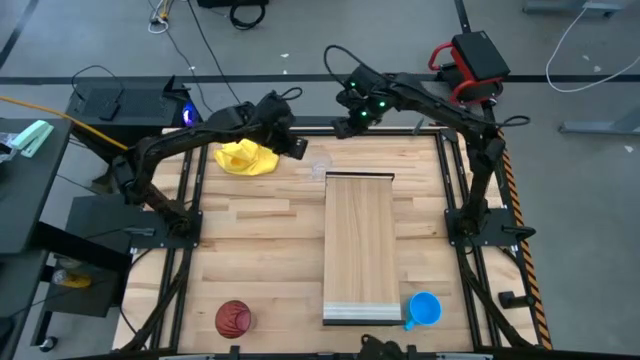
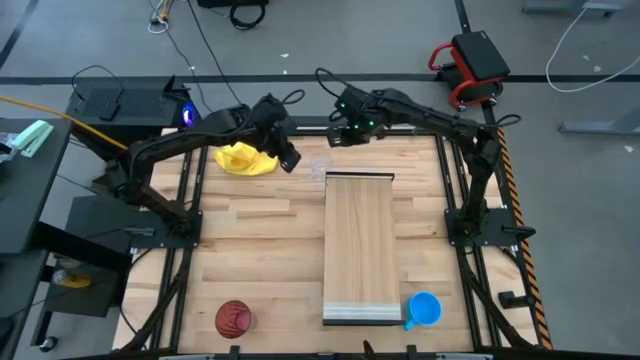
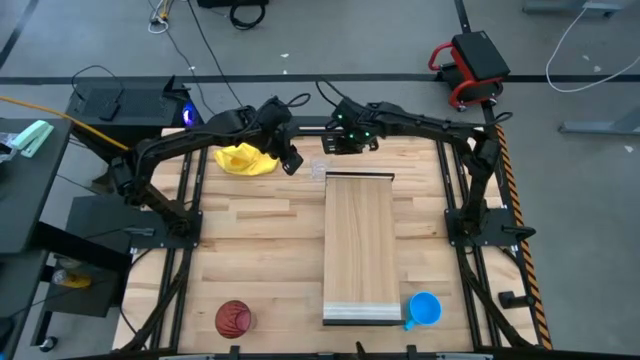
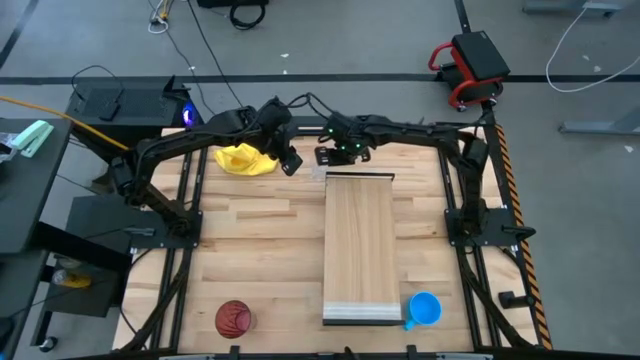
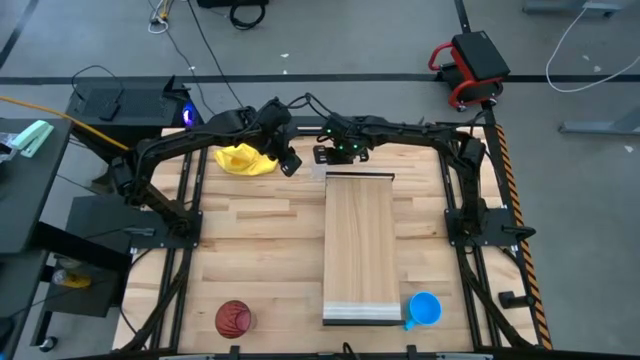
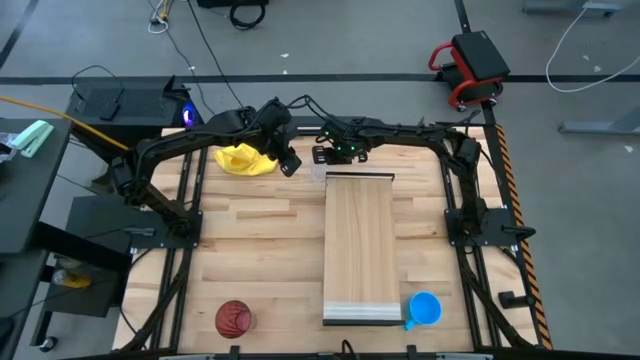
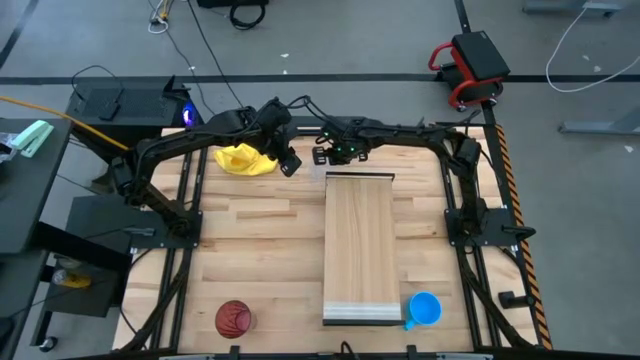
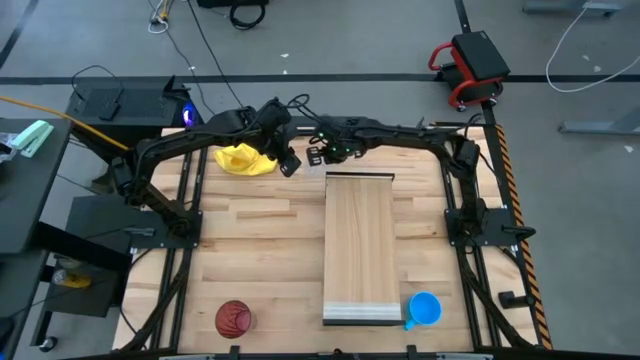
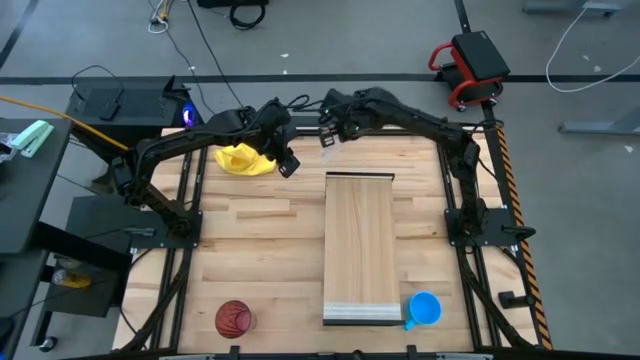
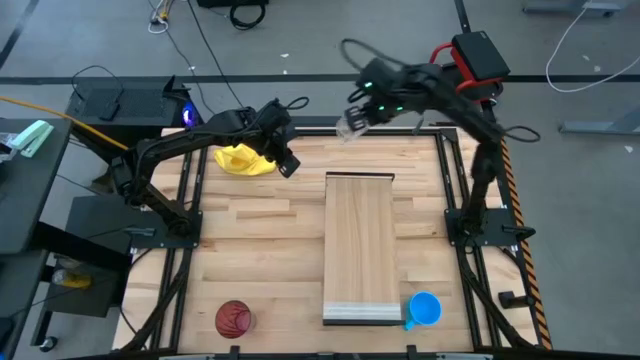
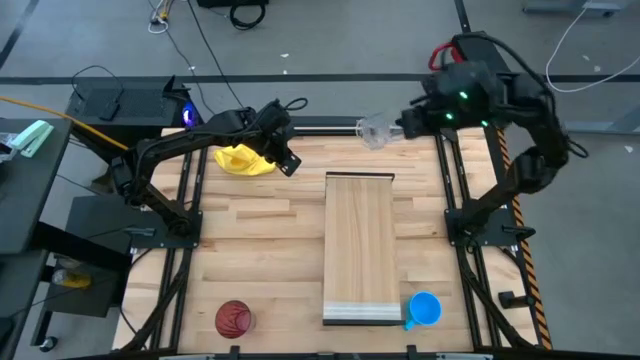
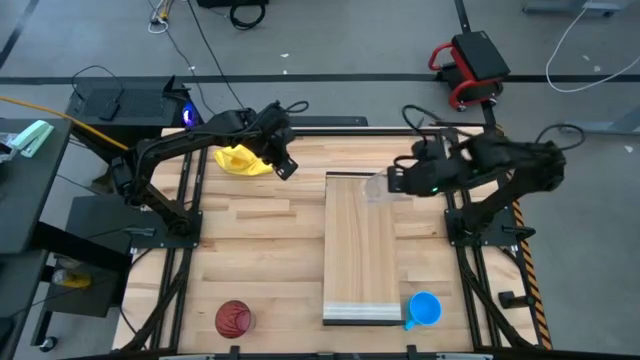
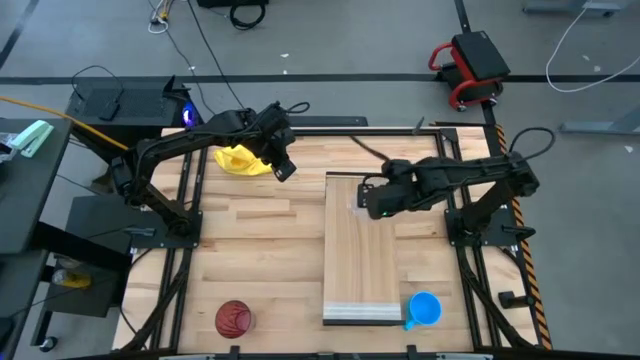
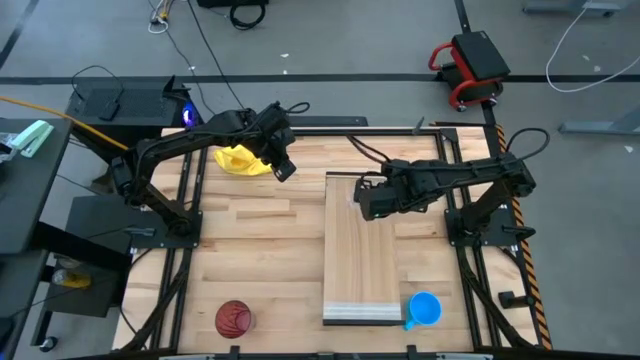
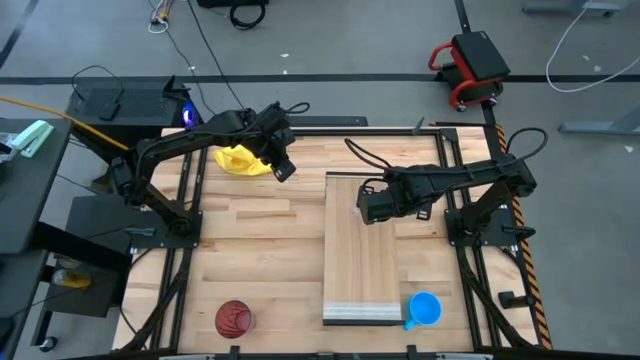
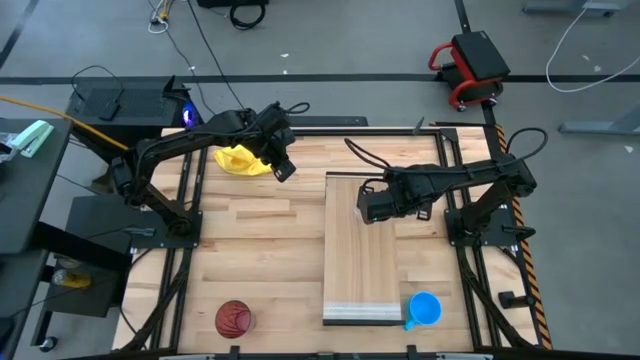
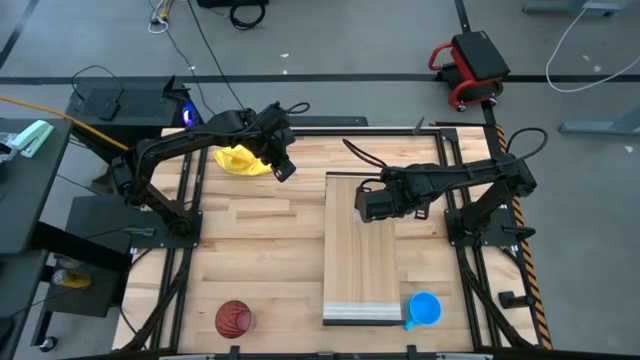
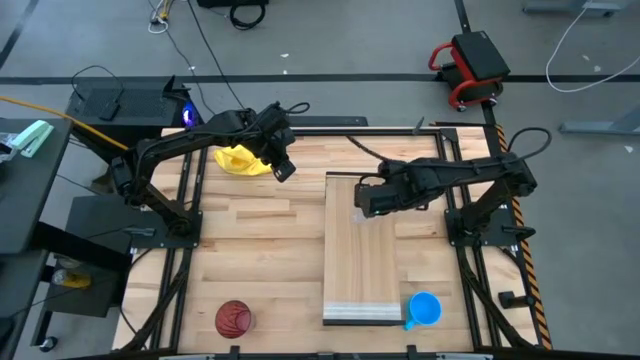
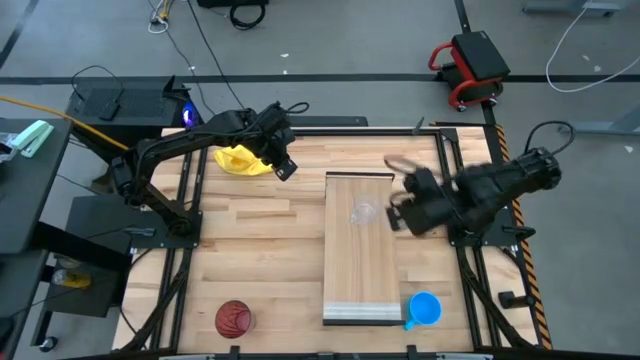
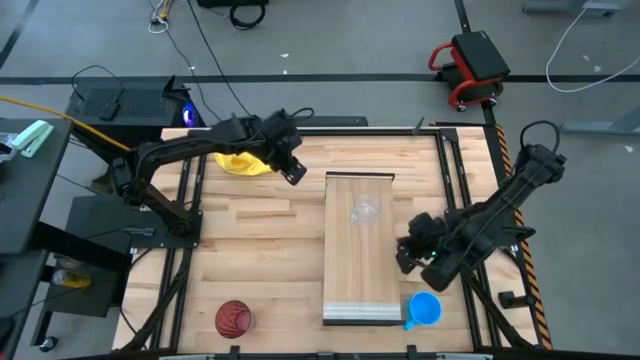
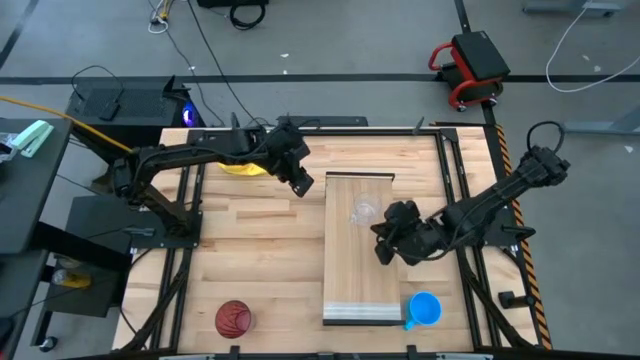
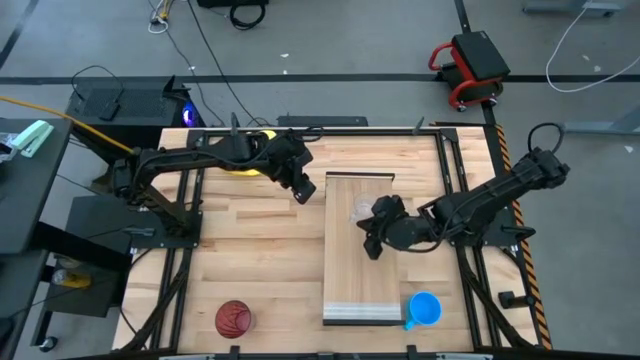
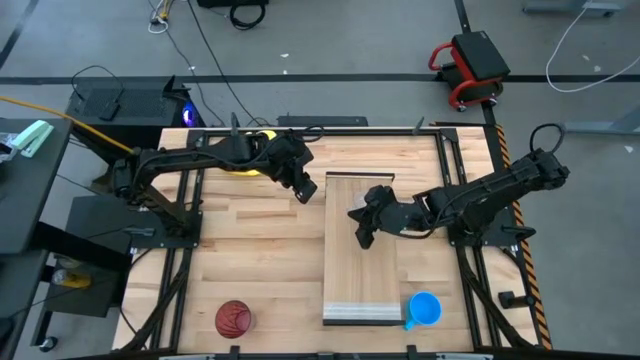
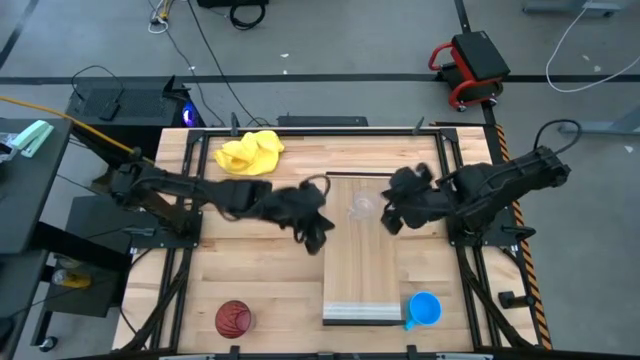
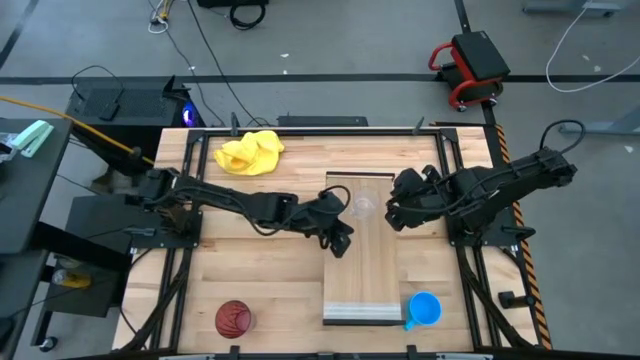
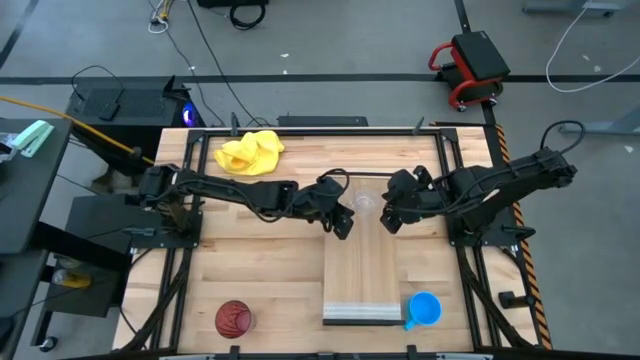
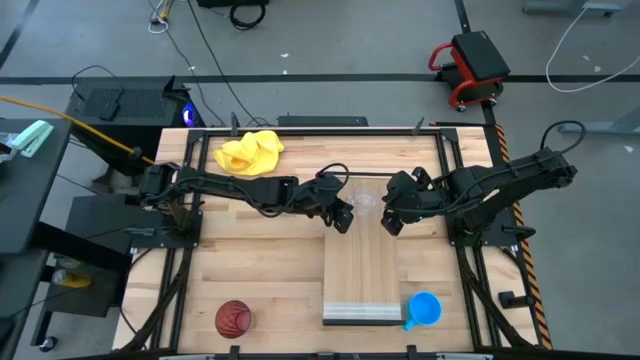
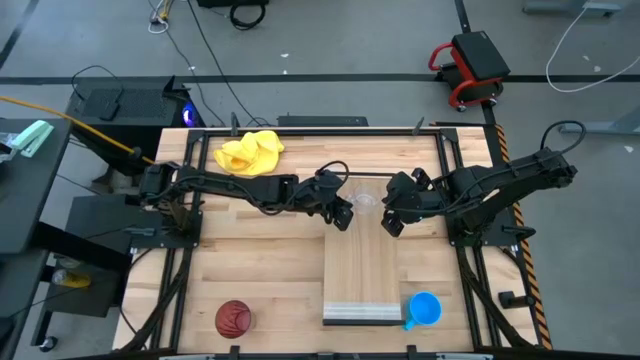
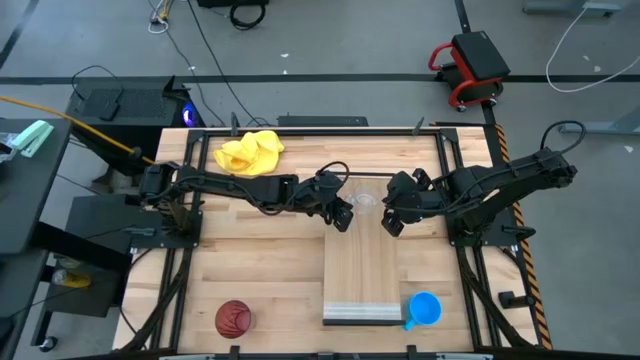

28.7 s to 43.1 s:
Task: Stack small to large cups/mugs on shelf
Put the transparent mug on the shelf

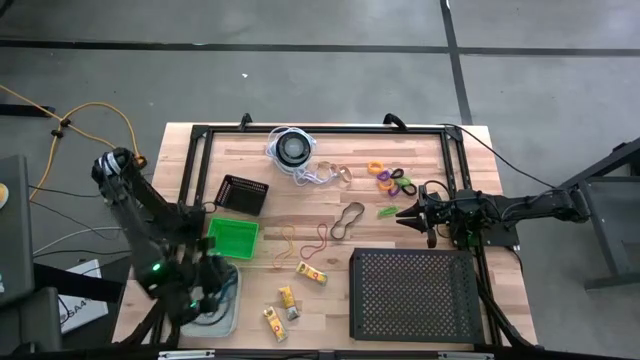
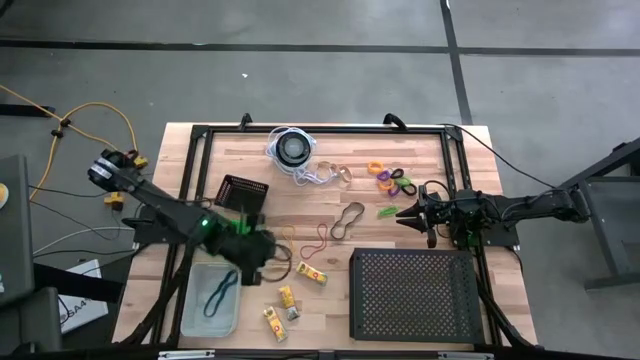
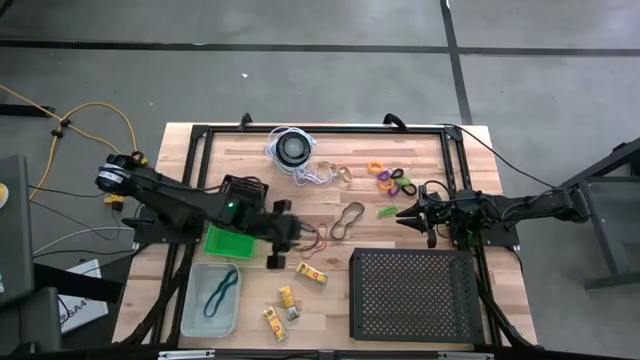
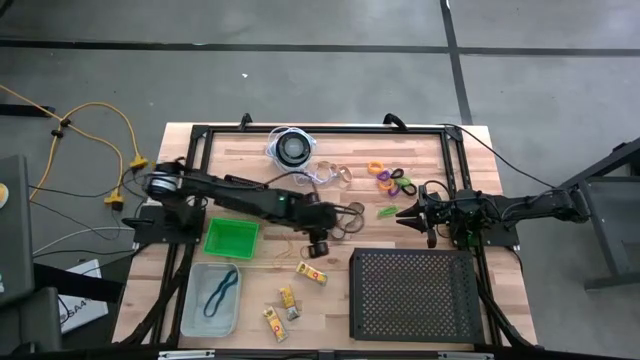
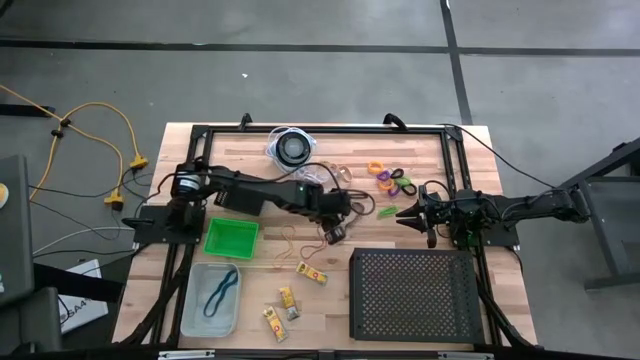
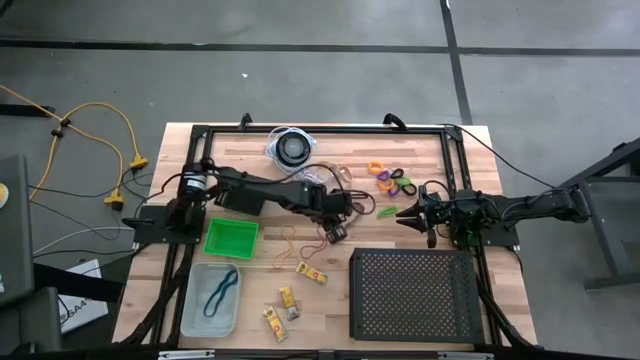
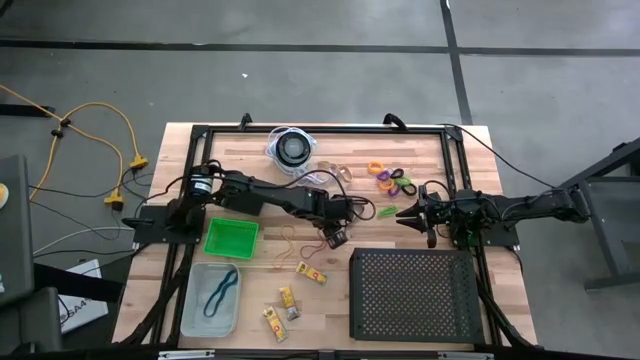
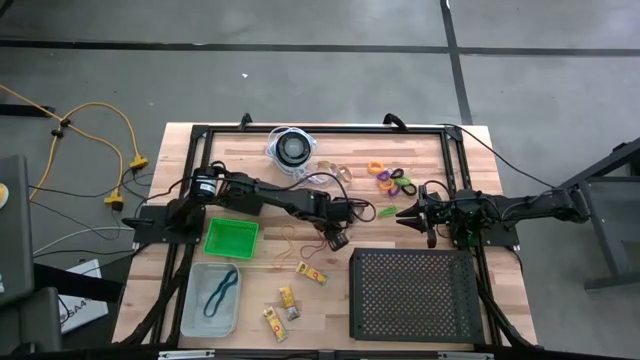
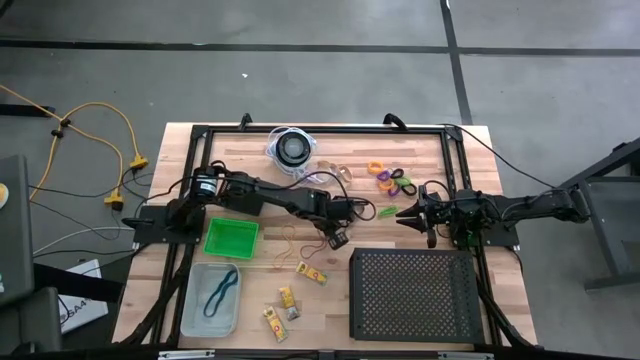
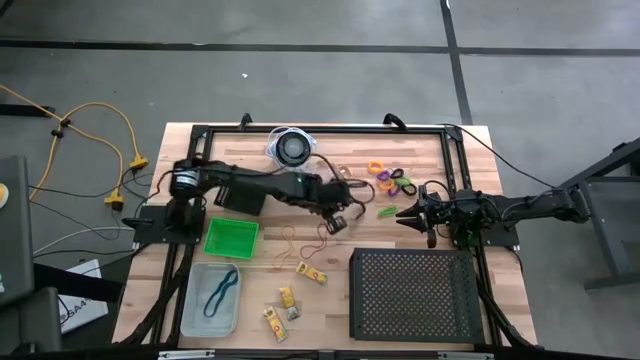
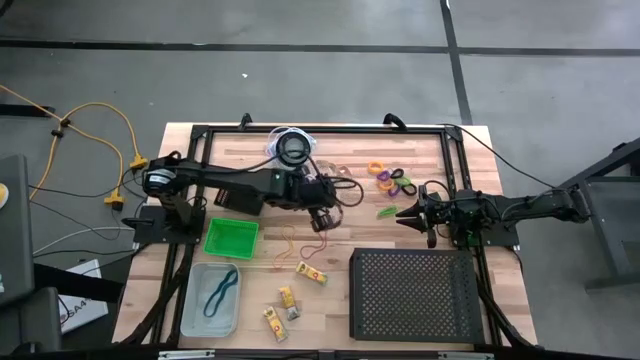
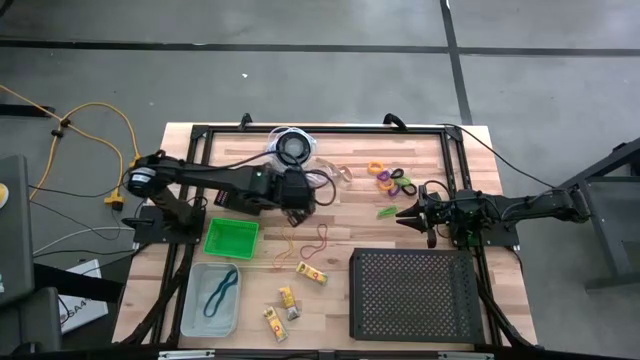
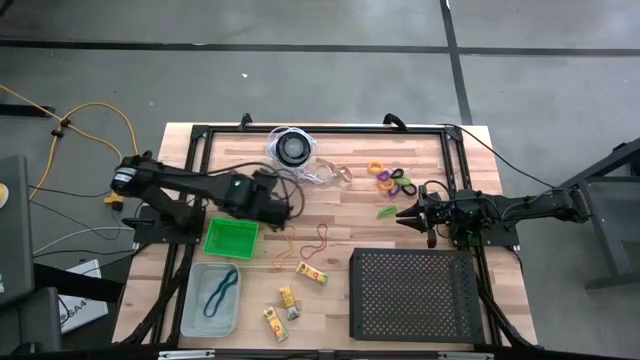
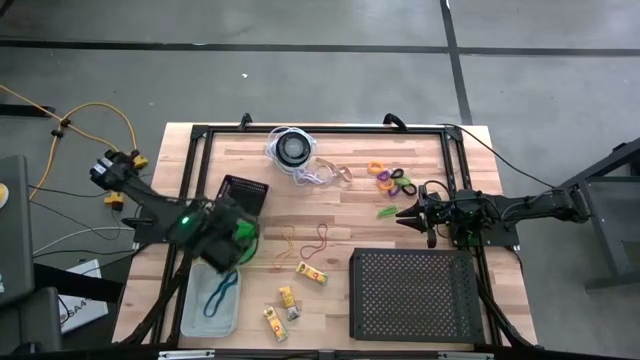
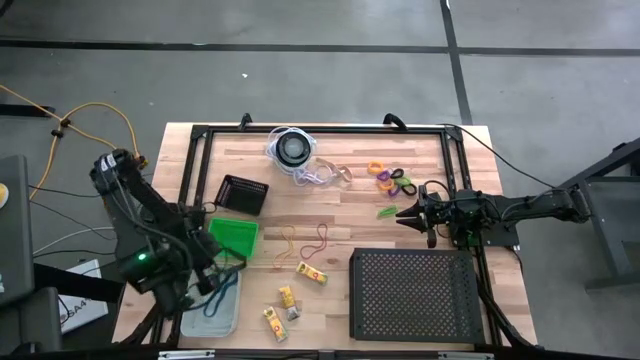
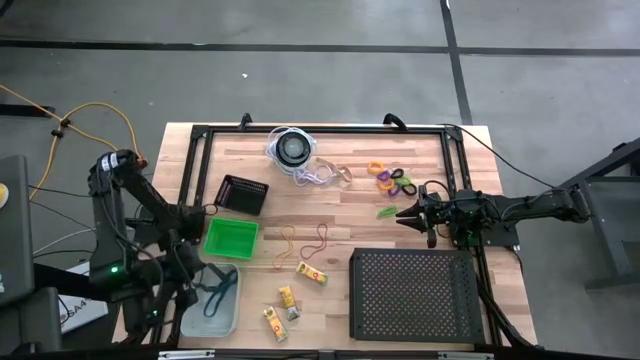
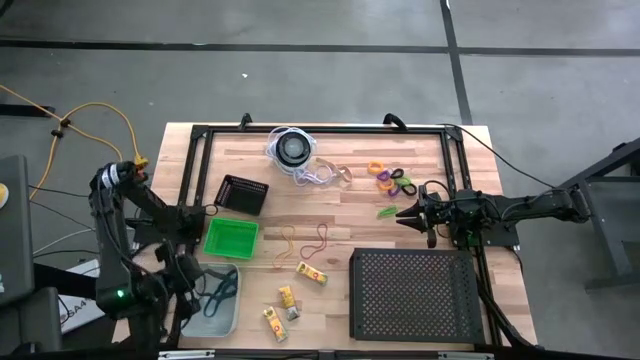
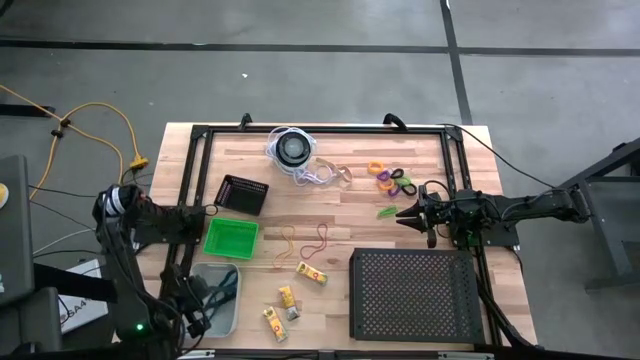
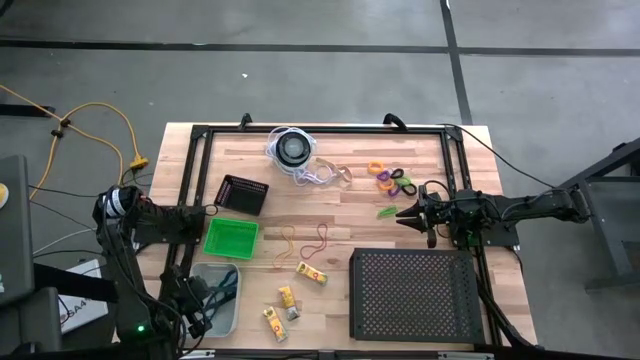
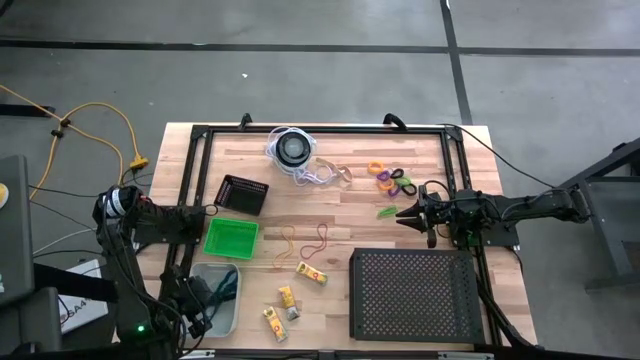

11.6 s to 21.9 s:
Task: Pick & Place Office Desk Supplies
Put the black rubber band into the gray bin
